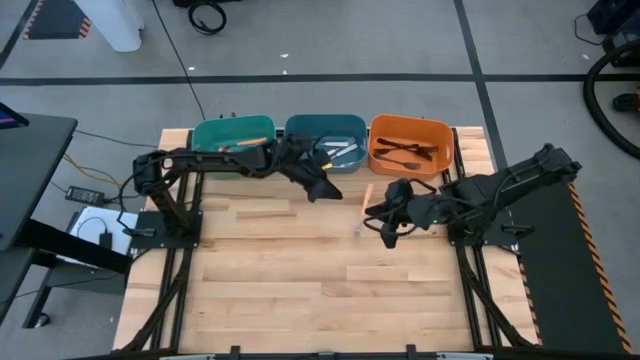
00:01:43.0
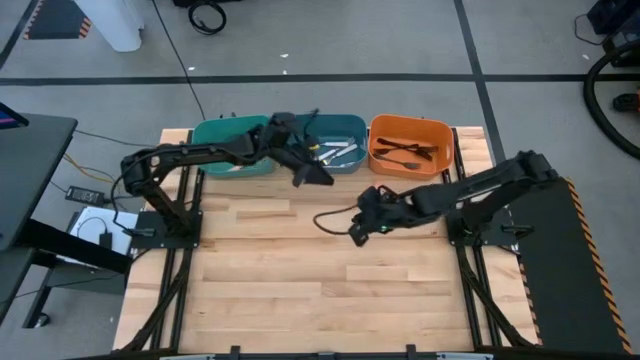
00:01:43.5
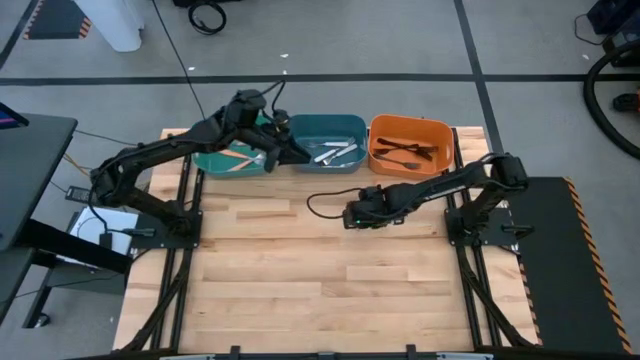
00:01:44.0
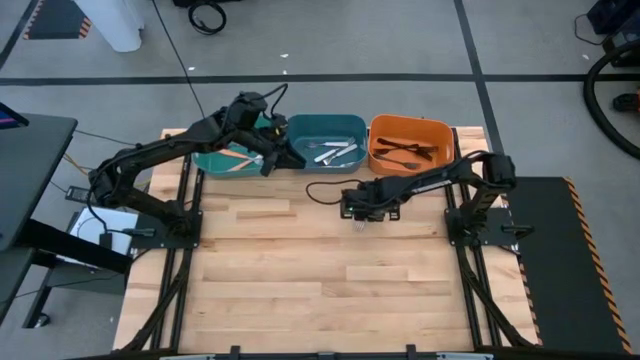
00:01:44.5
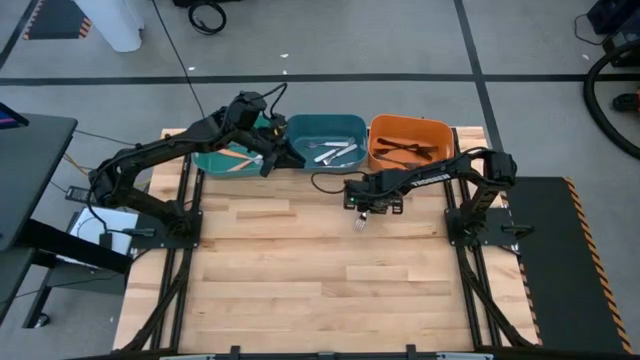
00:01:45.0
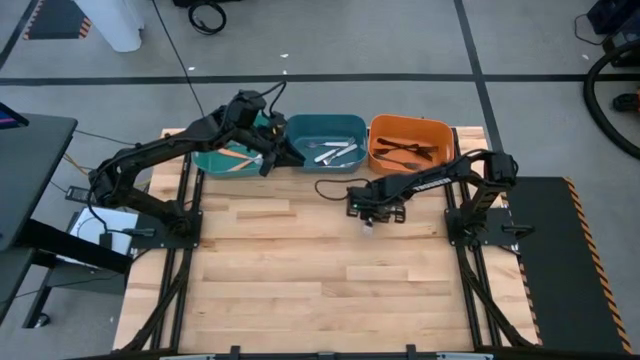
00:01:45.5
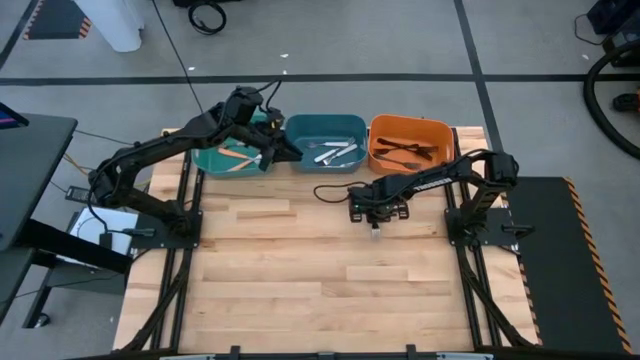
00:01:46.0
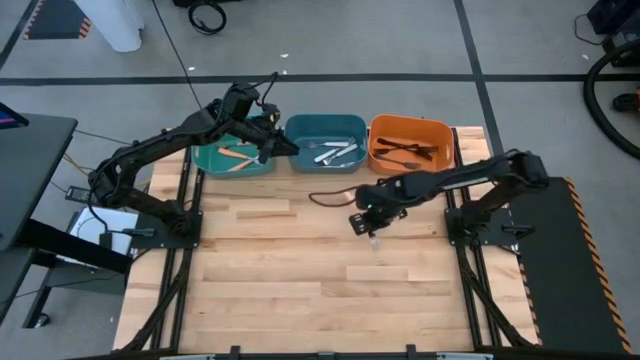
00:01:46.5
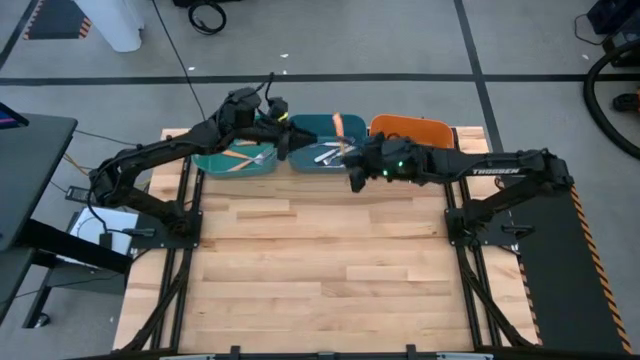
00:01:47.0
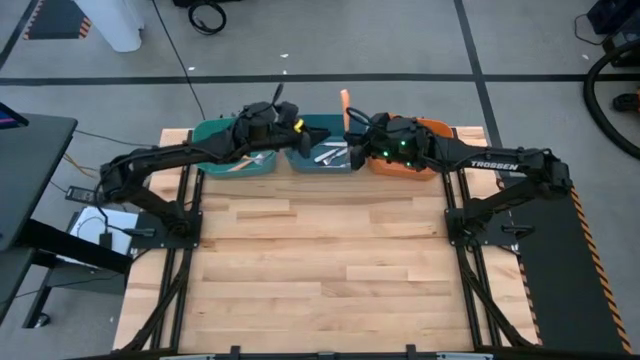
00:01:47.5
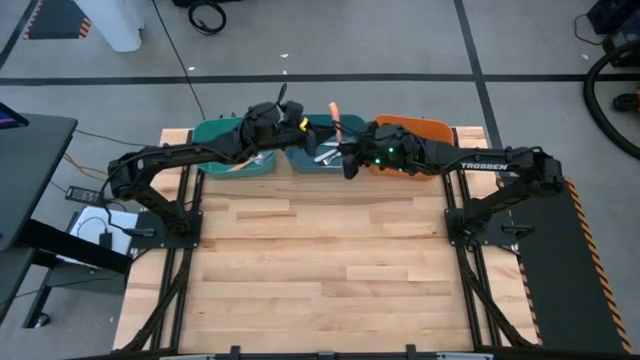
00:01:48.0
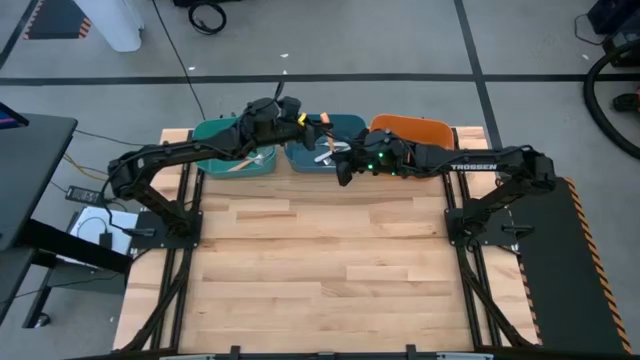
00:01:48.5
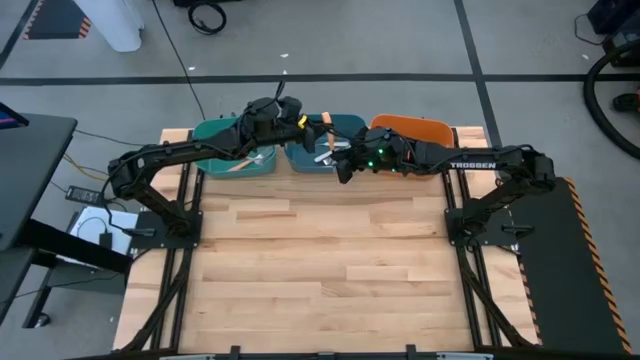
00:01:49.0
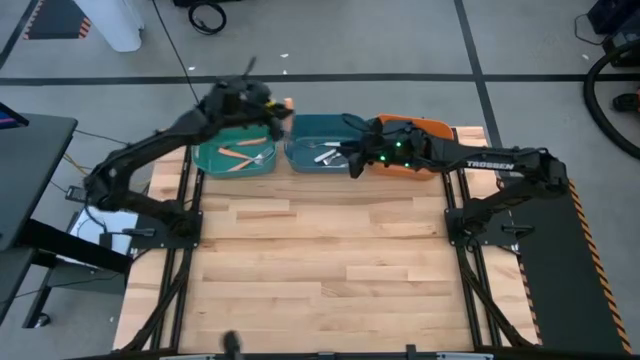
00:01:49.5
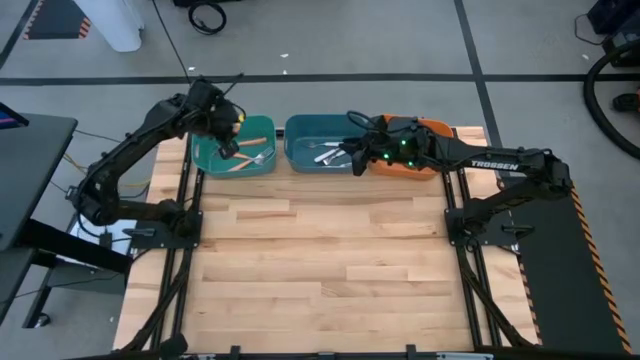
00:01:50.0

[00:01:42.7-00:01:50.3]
Task: Sort silverware by color (type)
Put the orange fork into the green bin

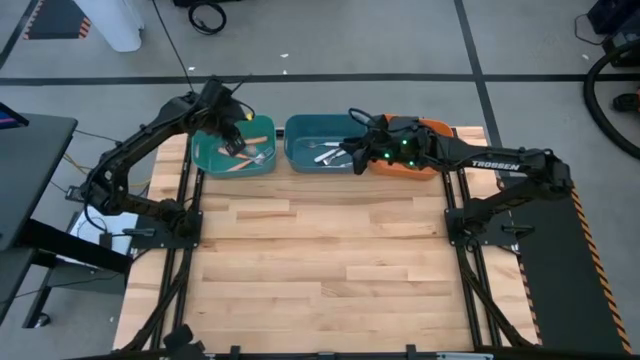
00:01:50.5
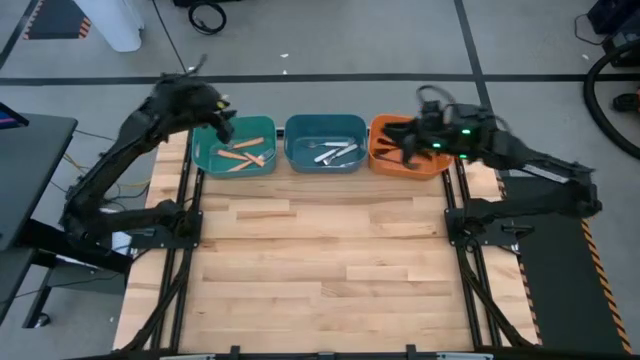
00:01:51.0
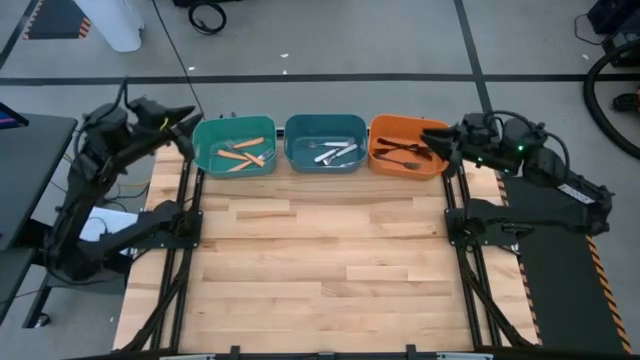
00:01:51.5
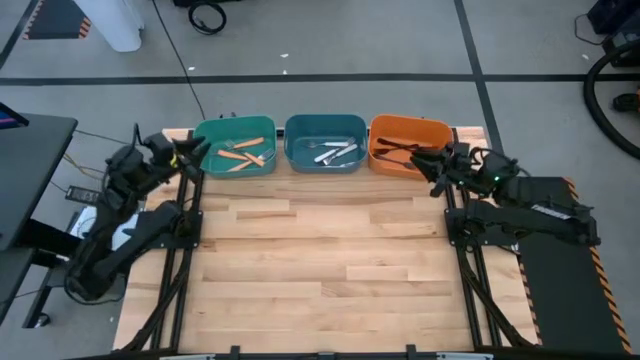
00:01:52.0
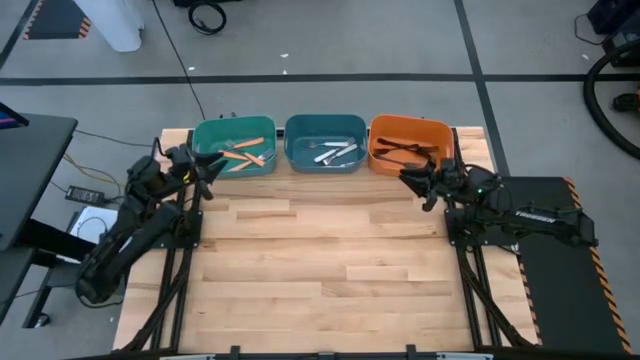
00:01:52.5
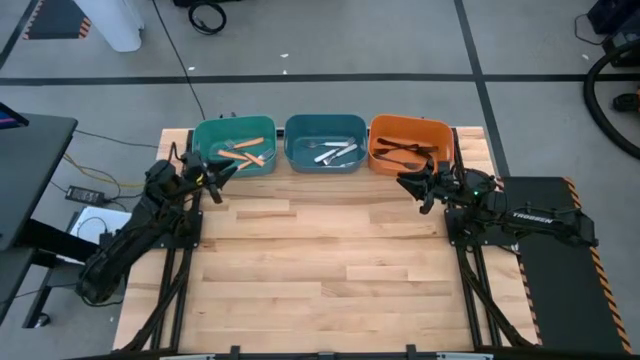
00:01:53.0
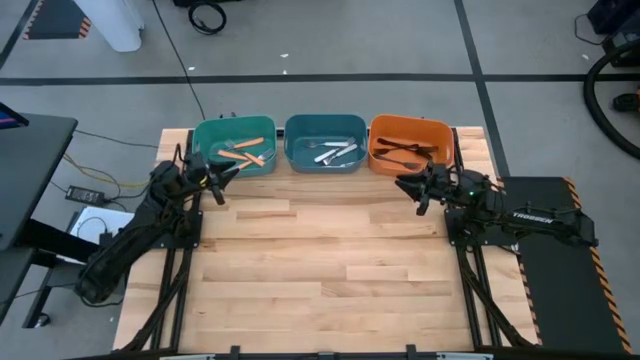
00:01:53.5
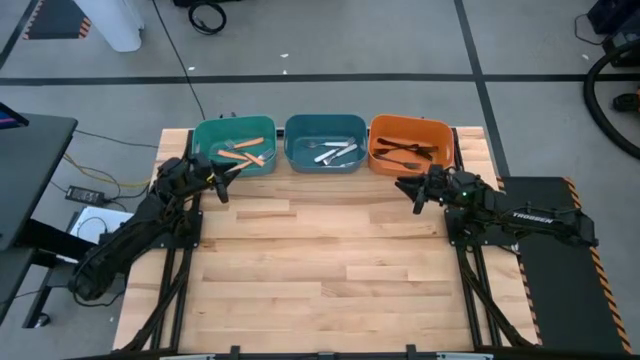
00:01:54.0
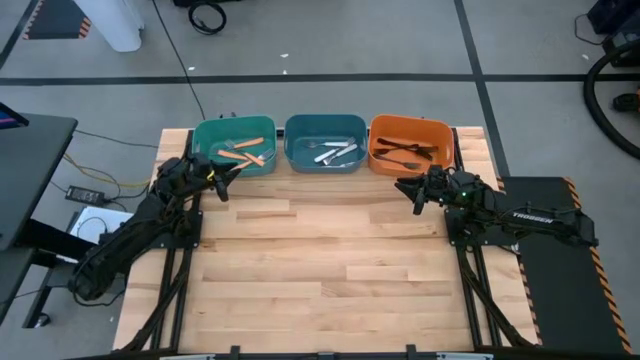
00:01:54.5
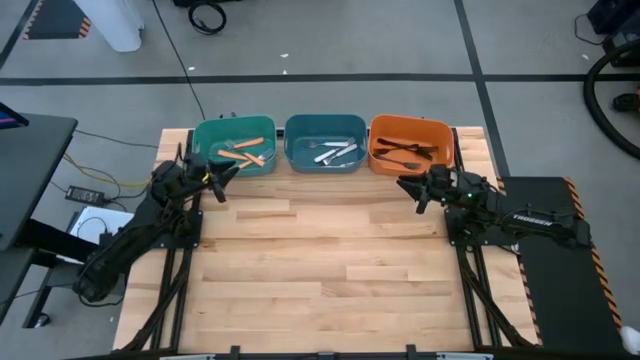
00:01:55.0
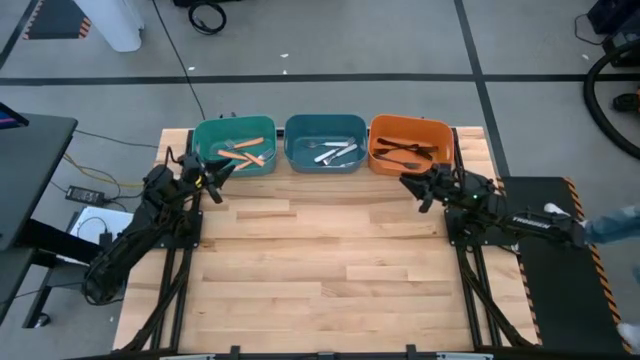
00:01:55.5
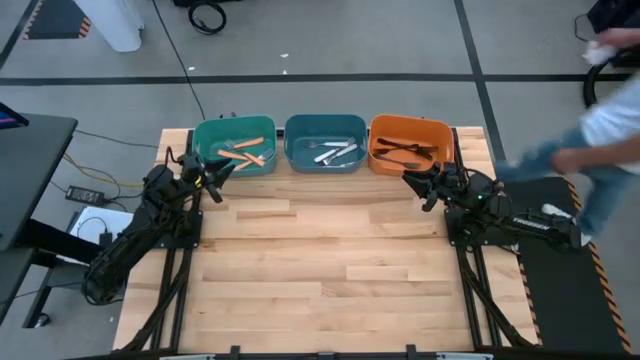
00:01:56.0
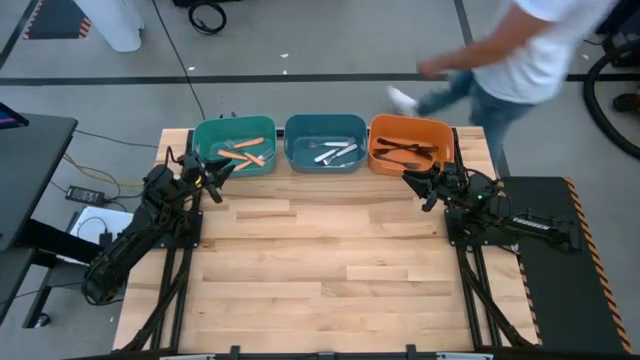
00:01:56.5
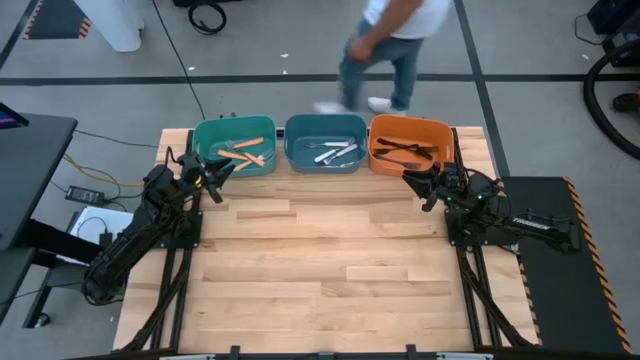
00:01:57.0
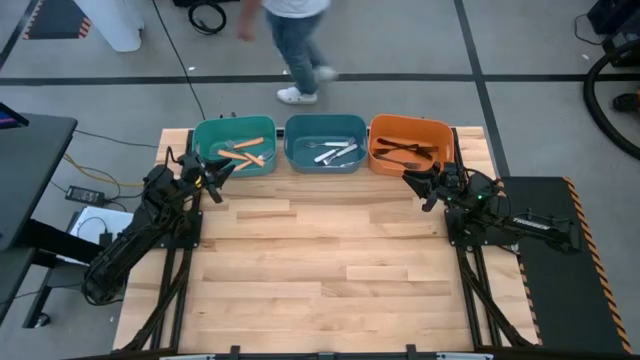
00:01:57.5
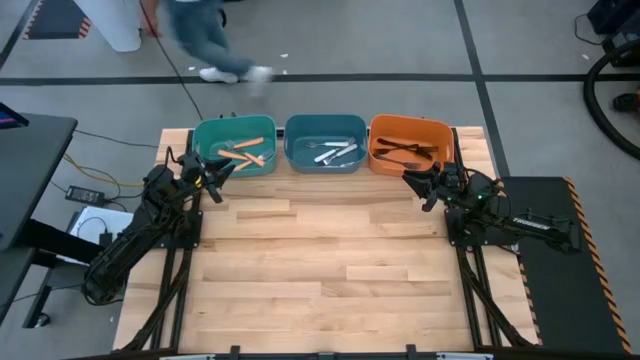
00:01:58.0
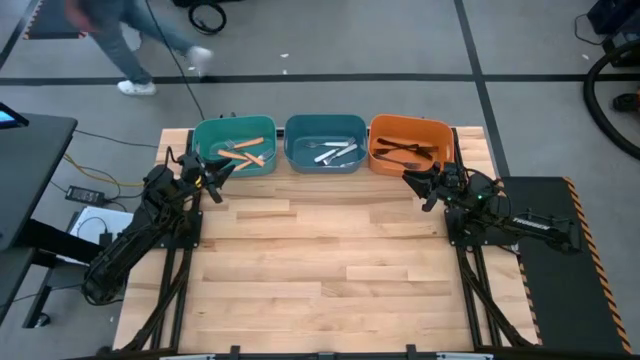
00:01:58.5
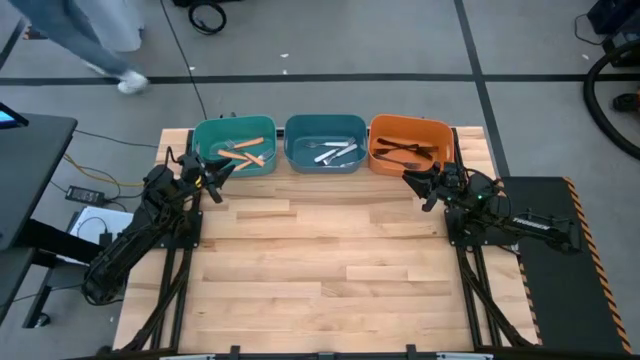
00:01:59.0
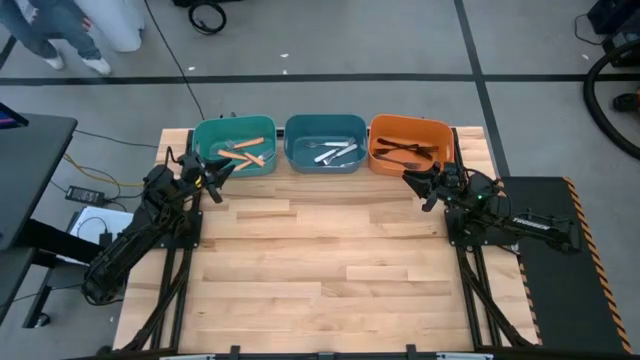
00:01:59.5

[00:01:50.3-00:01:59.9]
Return to Home Position

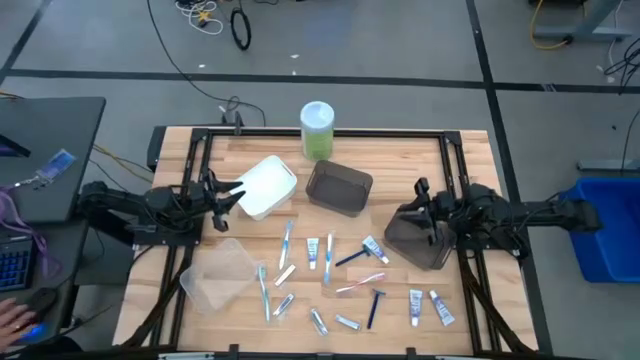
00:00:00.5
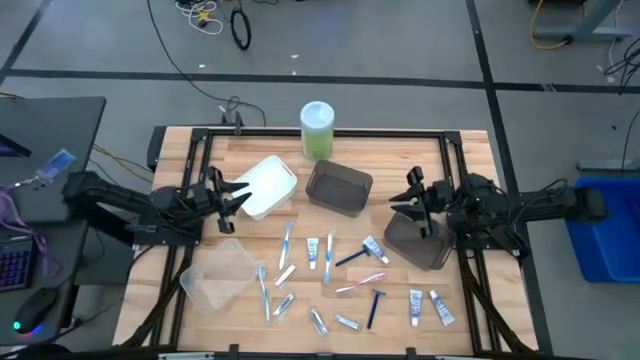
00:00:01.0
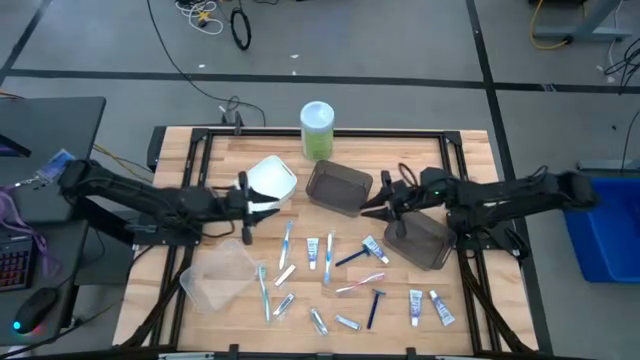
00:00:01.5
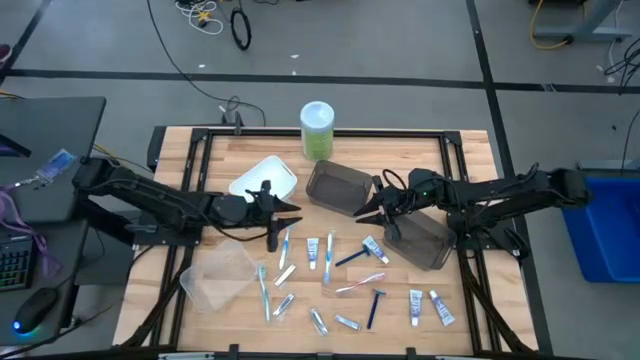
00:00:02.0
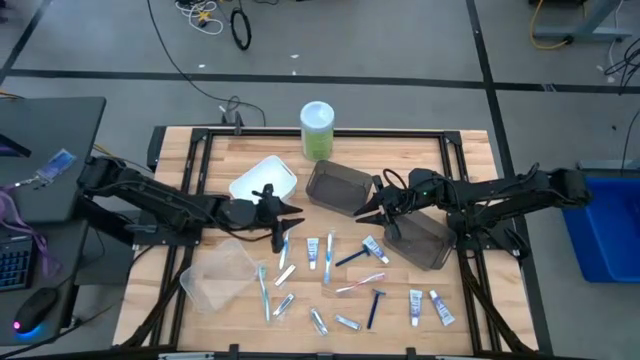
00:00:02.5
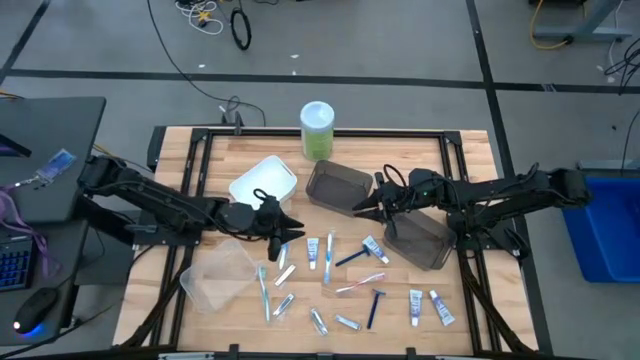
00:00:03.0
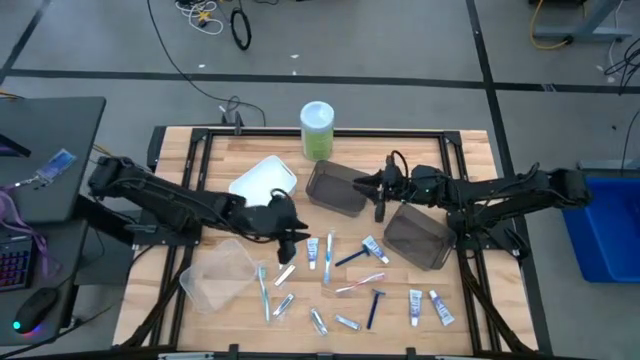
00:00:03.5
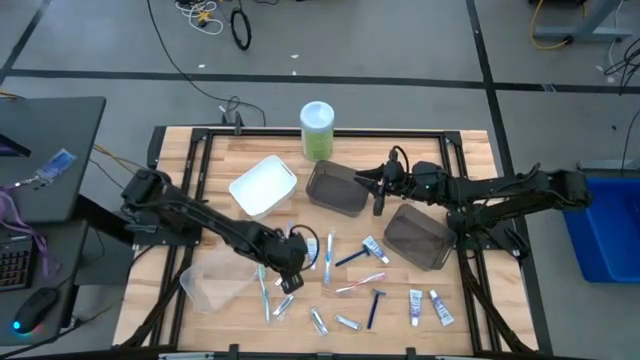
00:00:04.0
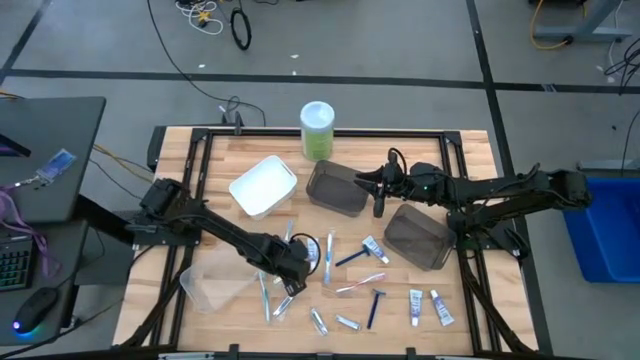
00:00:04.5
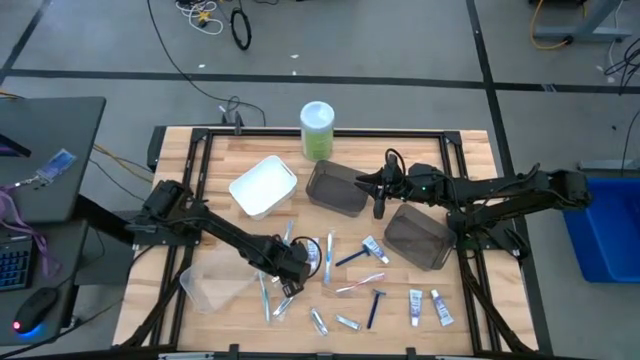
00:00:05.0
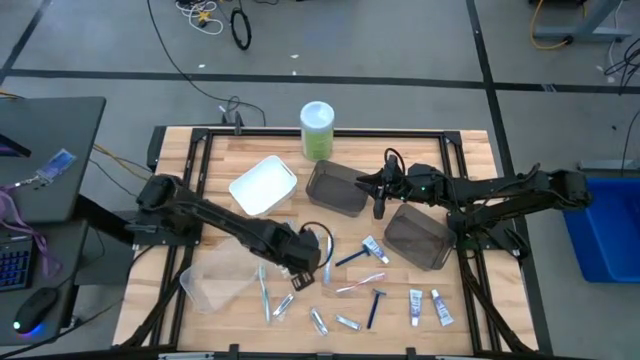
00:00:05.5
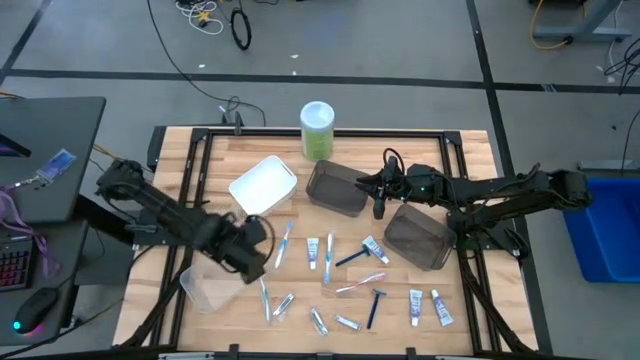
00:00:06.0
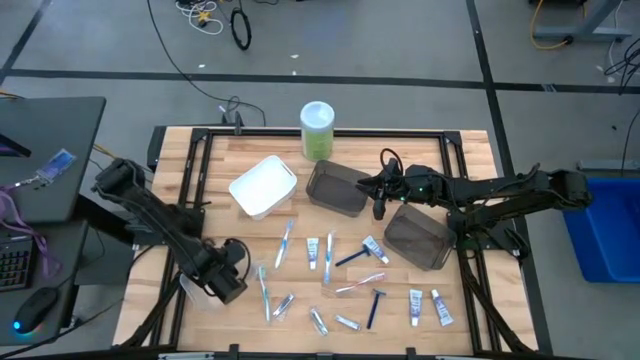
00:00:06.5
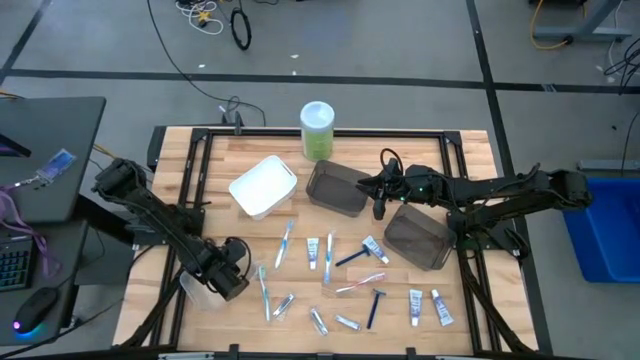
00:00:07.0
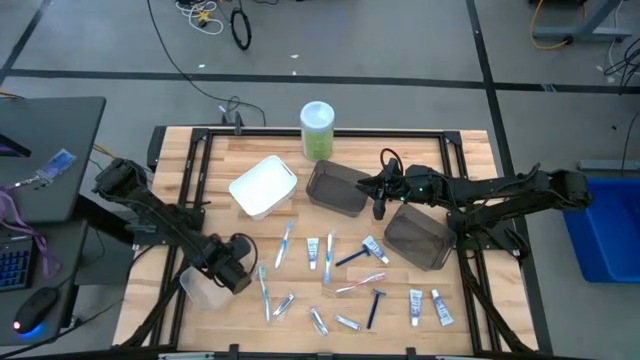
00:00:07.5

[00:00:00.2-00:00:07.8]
Task: Pick & Place Travel size toiletries
Put the left nail cutter into the transparent bin
